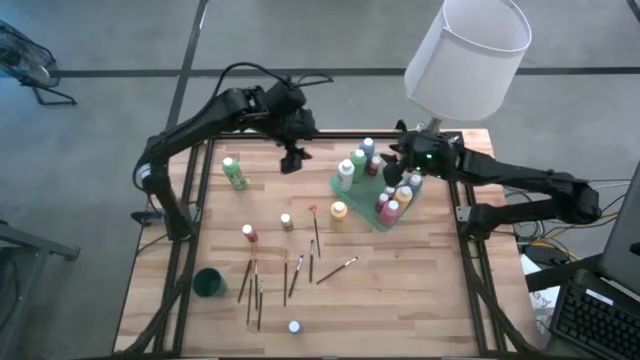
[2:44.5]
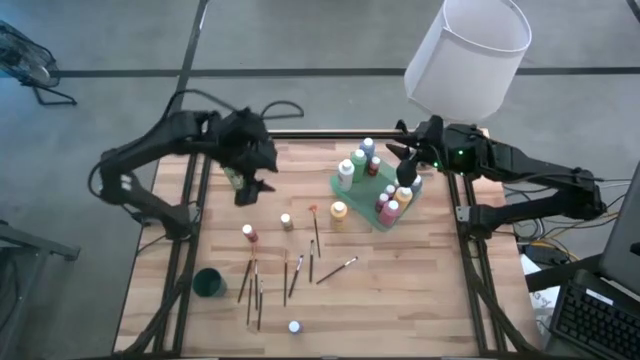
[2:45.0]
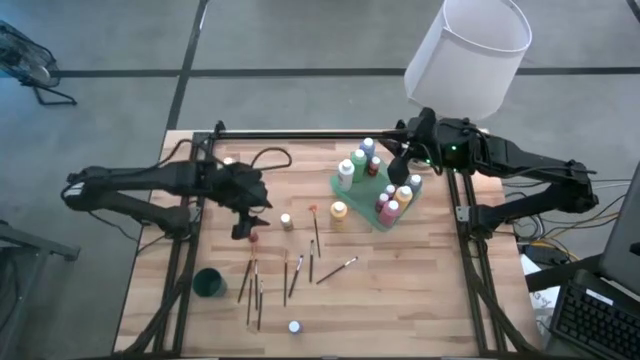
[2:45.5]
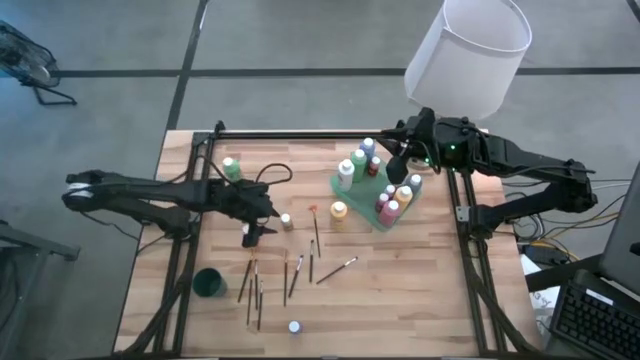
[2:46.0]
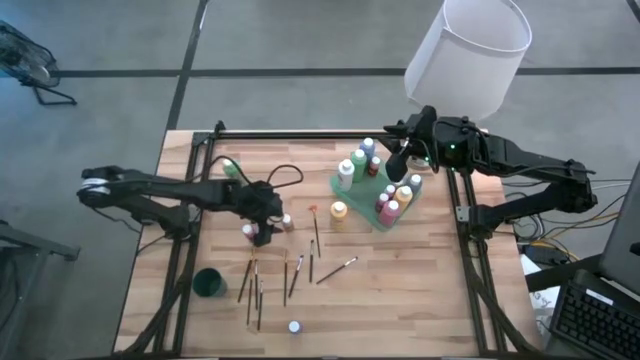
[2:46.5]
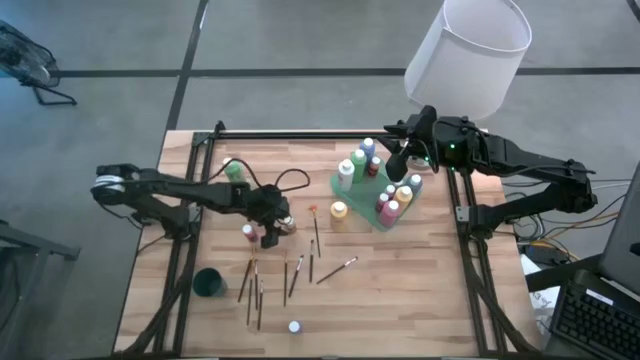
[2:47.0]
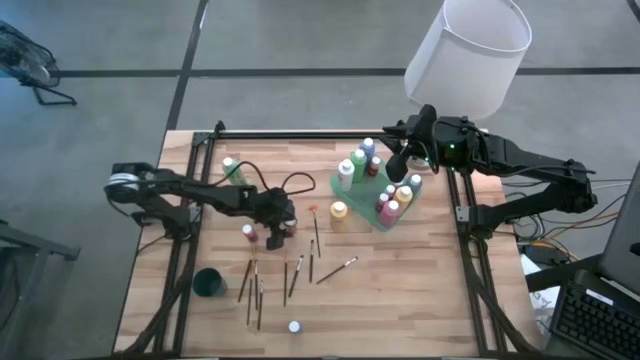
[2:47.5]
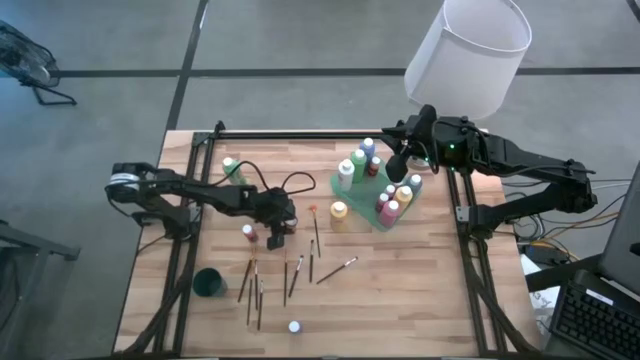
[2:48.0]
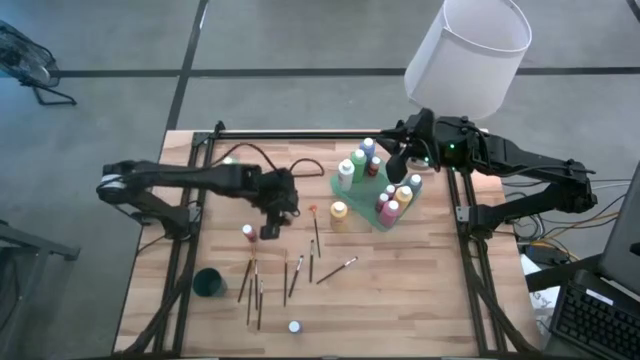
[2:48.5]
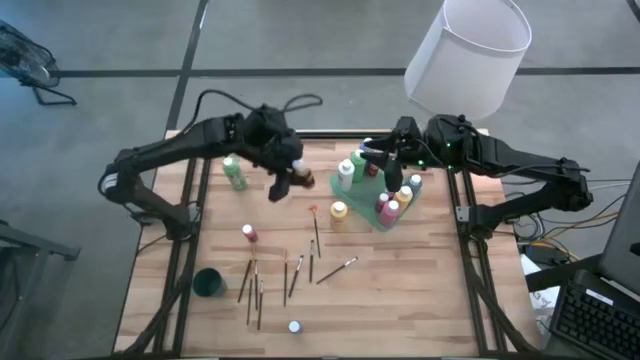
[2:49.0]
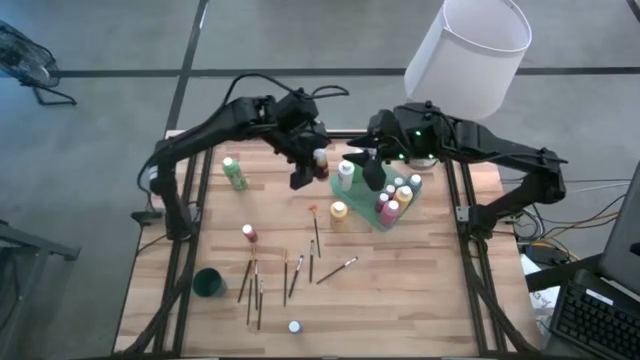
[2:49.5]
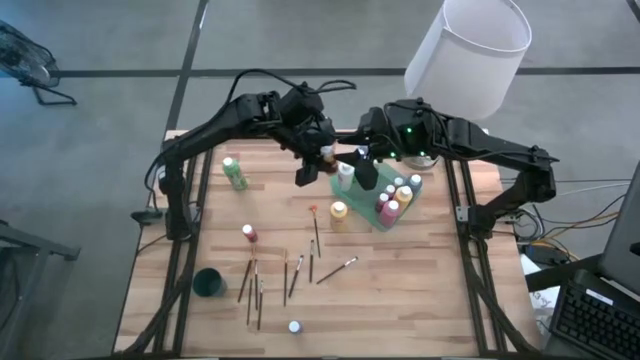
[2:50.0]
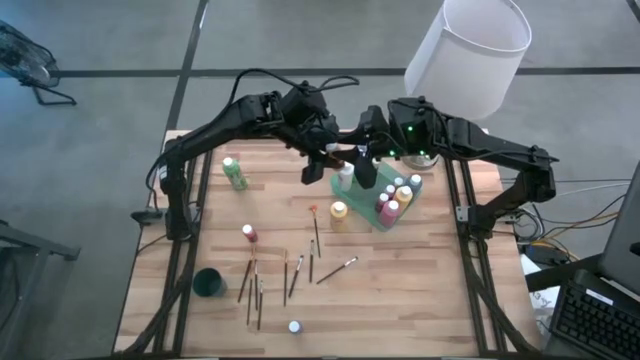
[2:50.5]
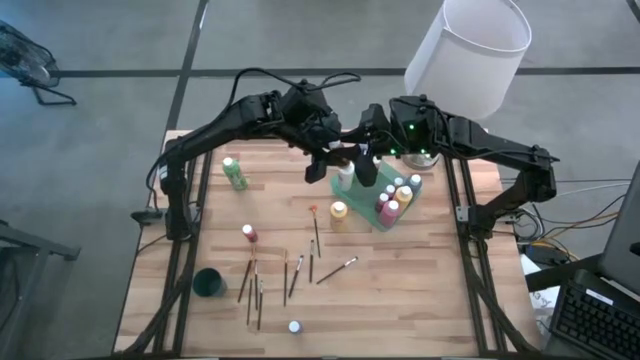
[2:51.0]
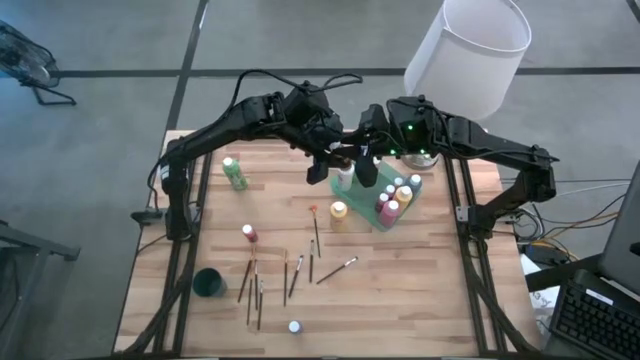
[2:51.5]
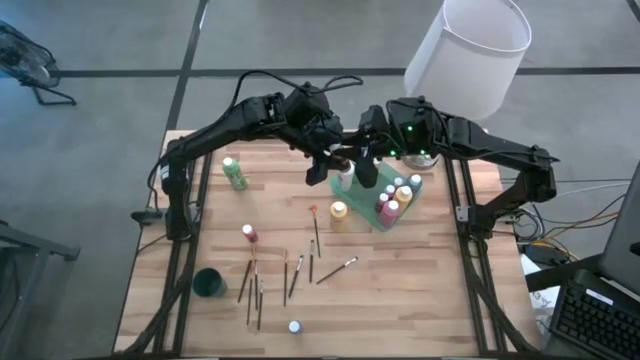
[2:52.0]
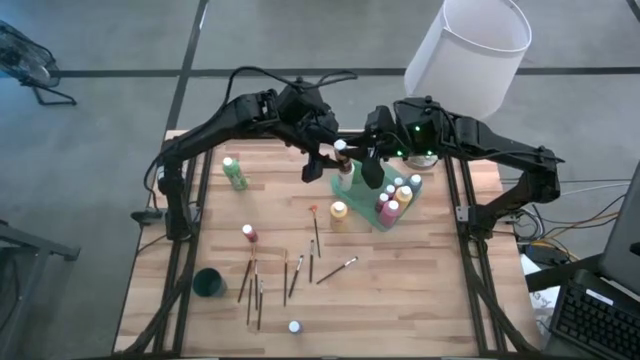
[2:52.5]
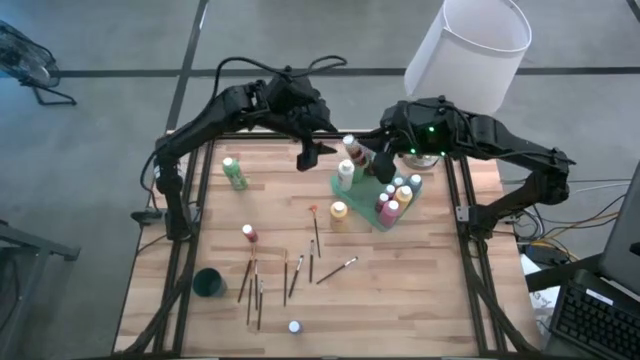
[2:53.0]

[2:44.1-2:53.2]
Task: Pick & Place Paint Supplies
Put the small yellow paint bottle into the green bin

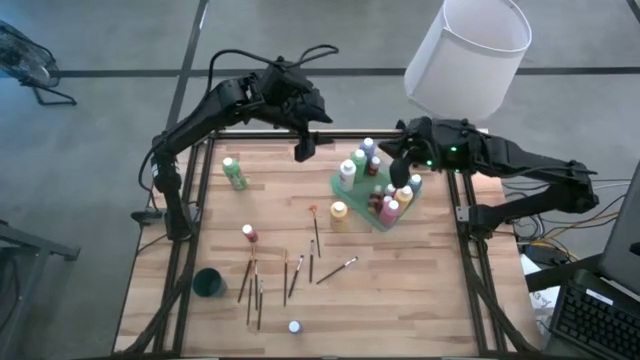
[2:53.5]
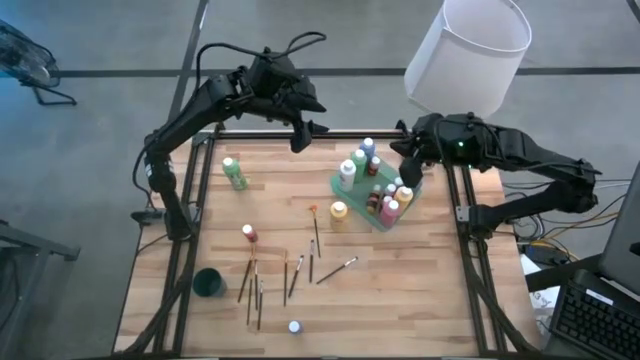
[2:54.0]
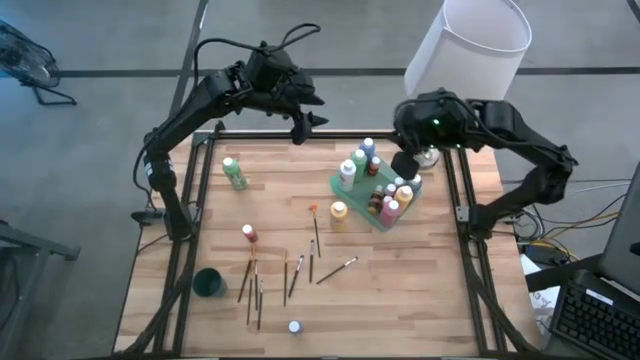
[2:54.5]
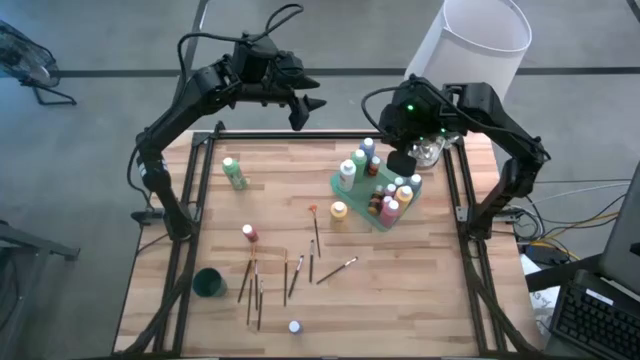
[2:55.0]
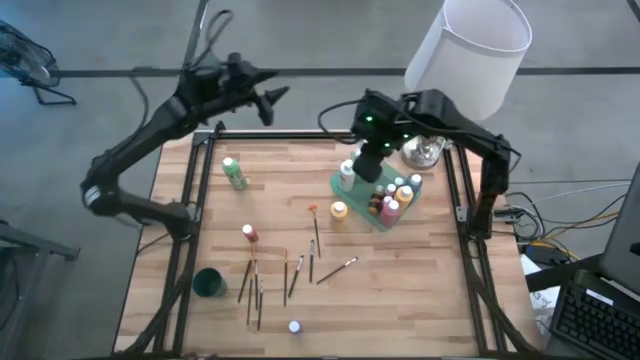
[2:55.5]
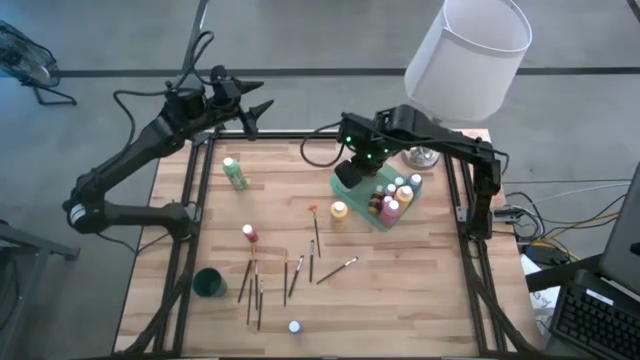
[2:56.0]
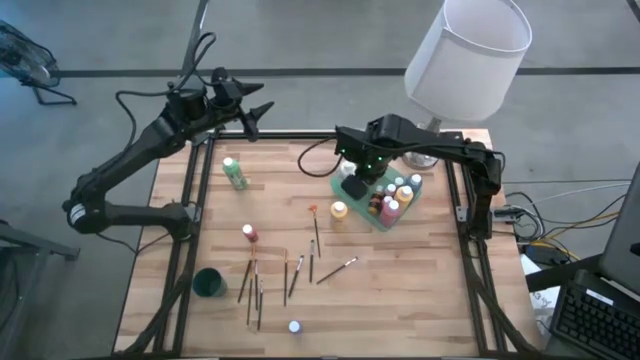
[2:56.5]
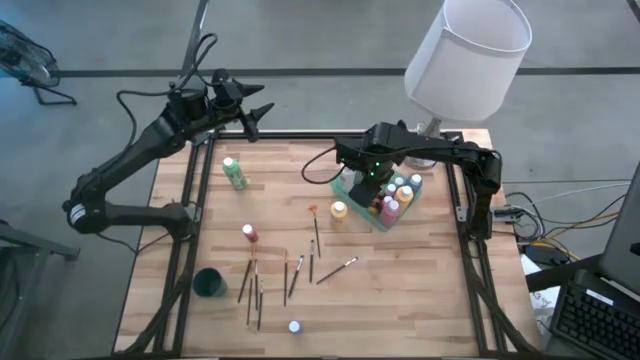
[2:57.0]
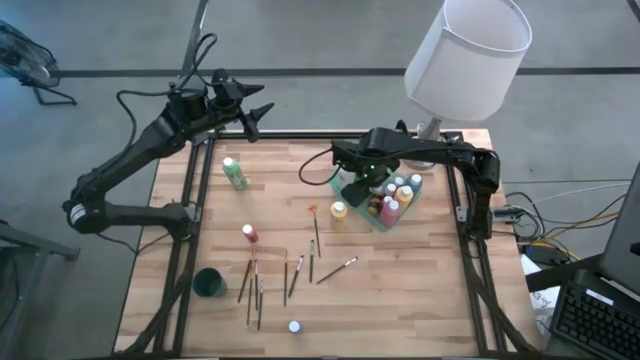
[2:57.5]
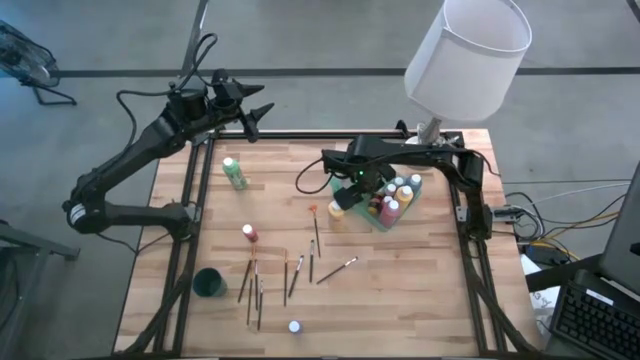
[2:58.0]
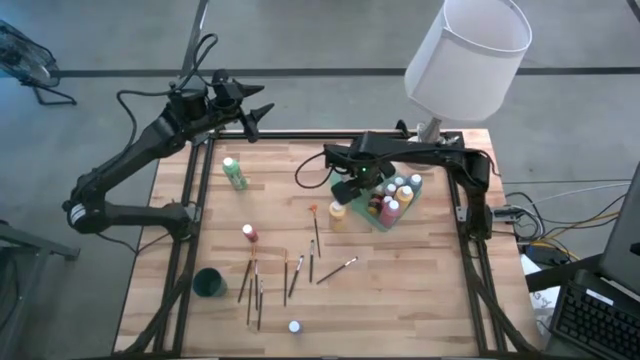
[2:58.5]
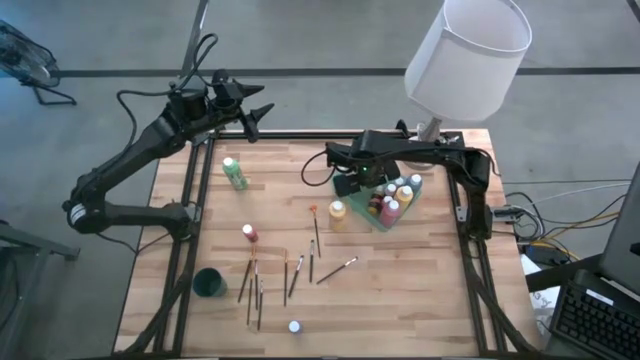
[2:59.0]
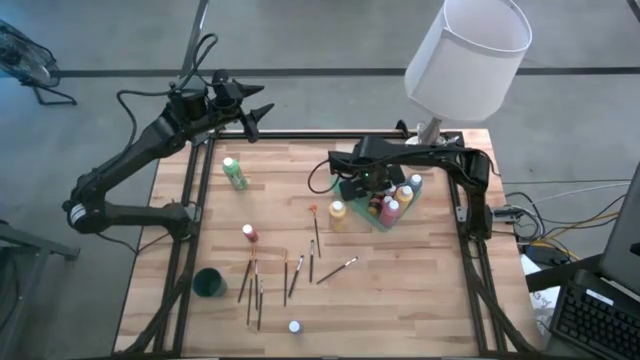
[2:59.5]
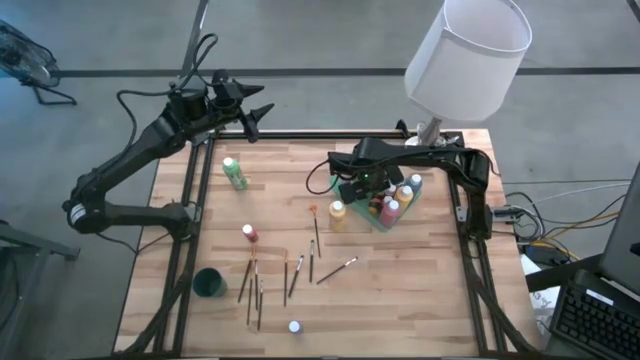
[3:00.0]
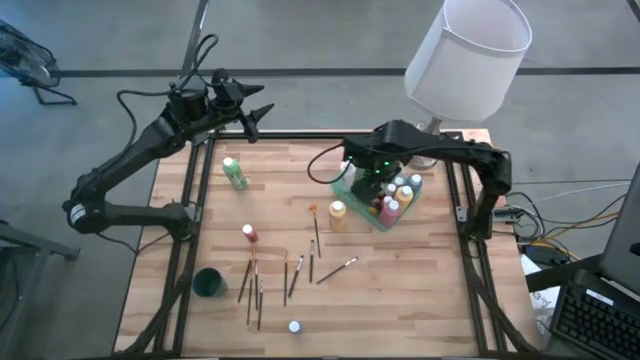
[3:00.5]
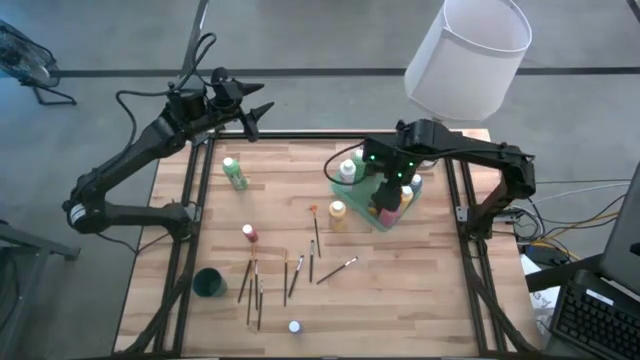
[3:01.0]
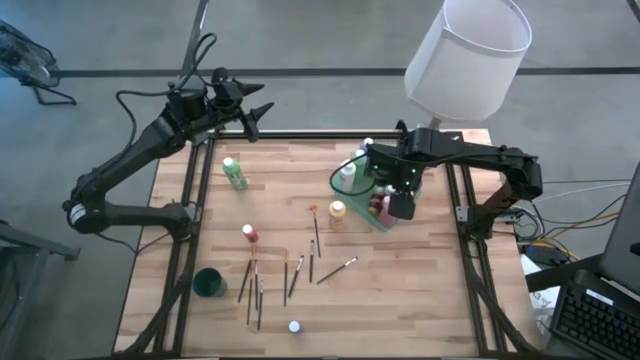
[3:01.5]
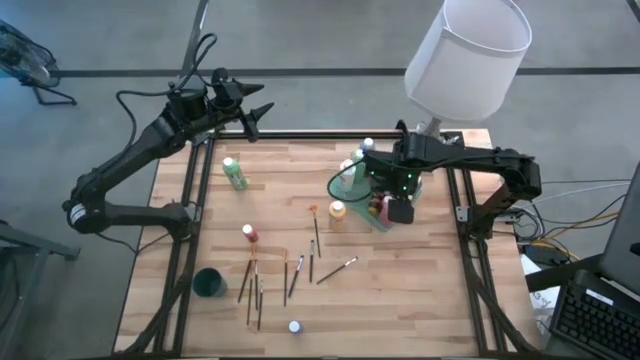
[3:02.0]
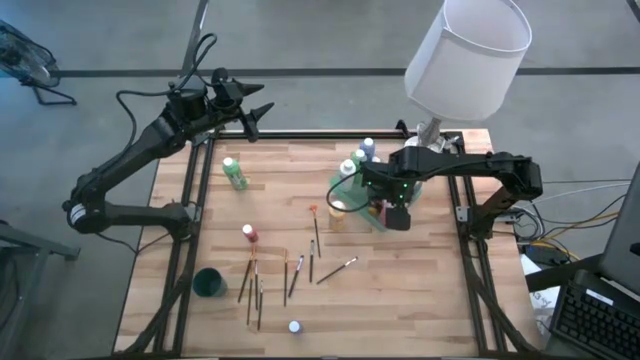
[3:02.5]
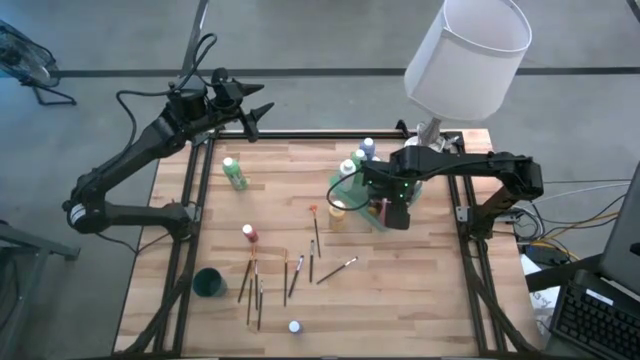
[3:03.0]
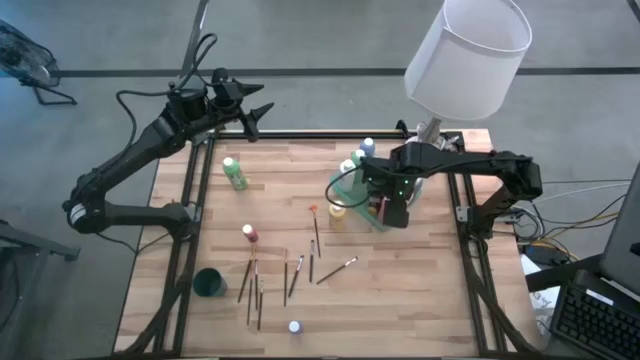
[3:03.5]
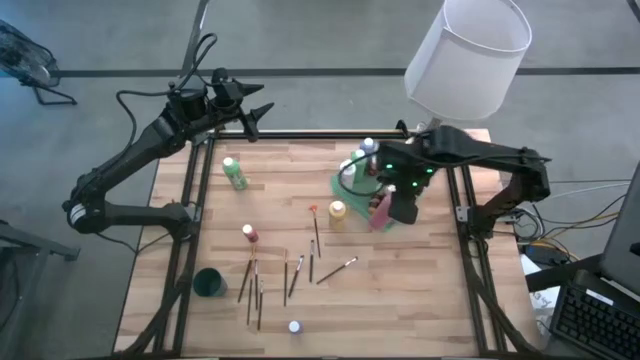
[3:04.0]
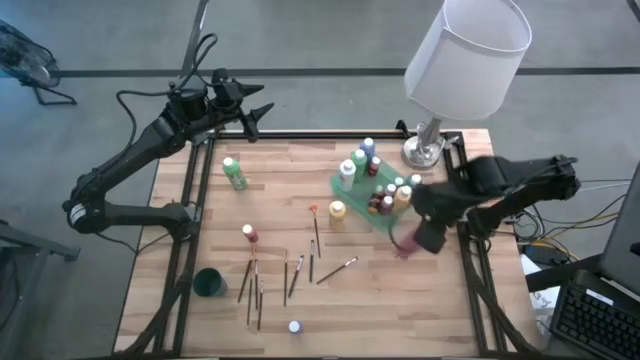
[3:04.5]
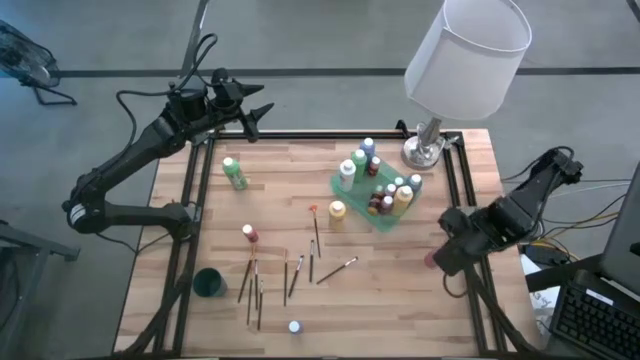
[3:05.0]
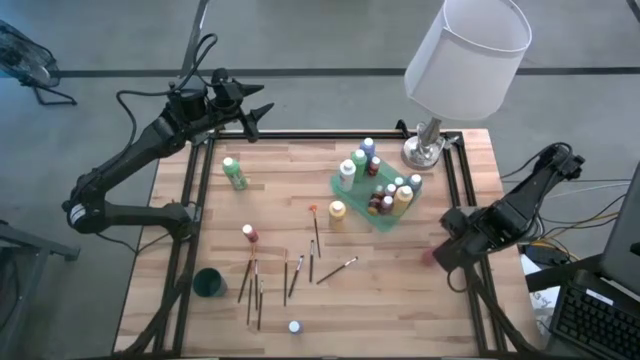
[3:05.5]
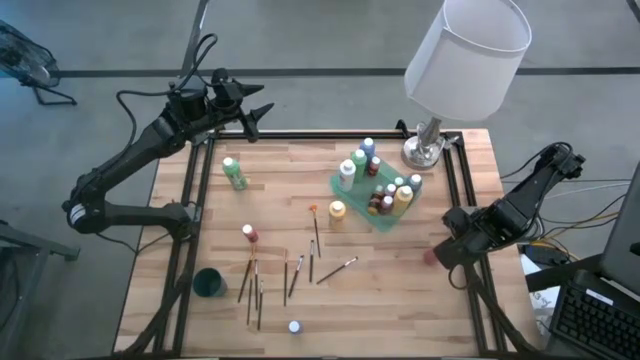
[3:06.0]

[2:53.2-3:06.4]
Remove the big pink paint bottle from the green bin
